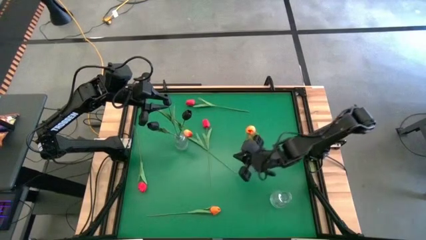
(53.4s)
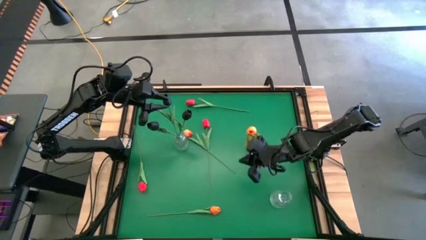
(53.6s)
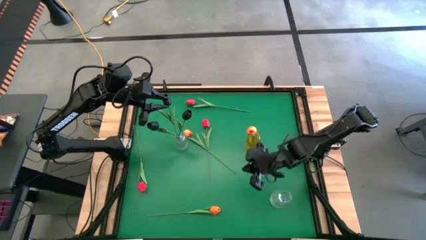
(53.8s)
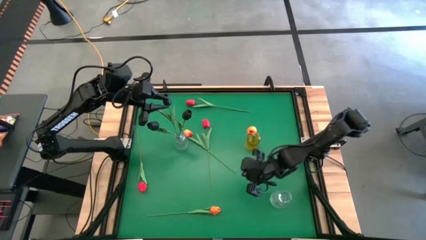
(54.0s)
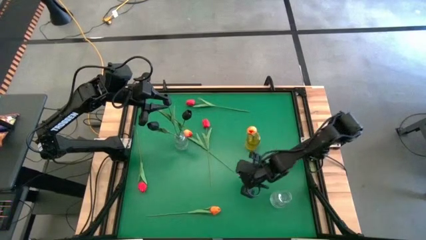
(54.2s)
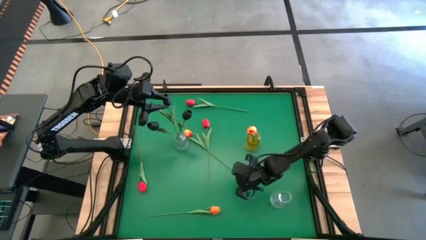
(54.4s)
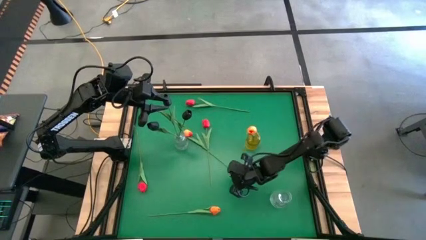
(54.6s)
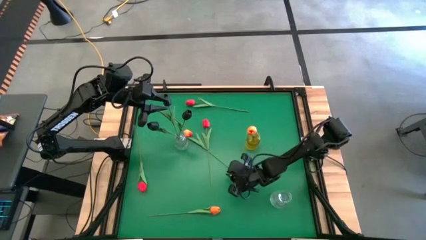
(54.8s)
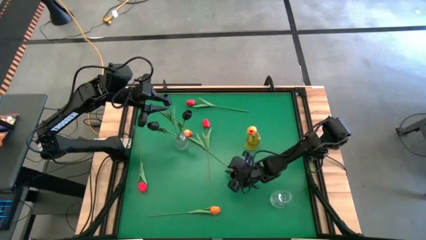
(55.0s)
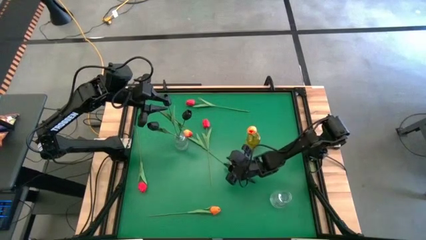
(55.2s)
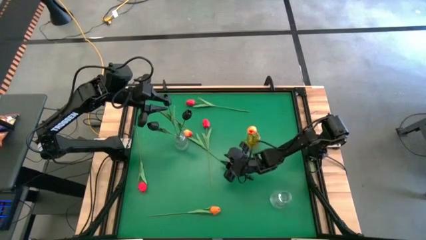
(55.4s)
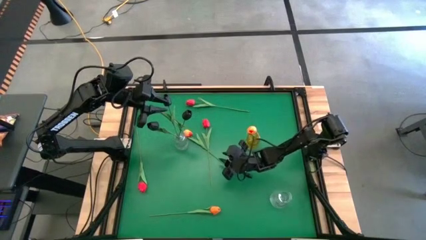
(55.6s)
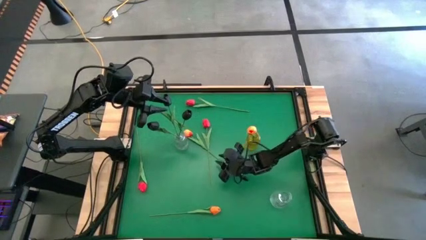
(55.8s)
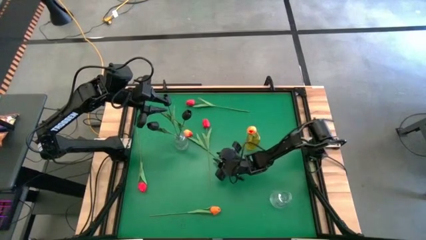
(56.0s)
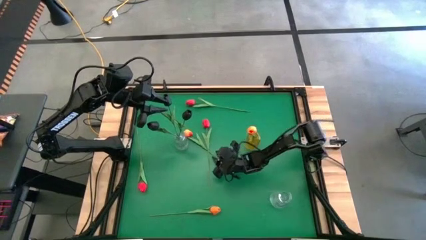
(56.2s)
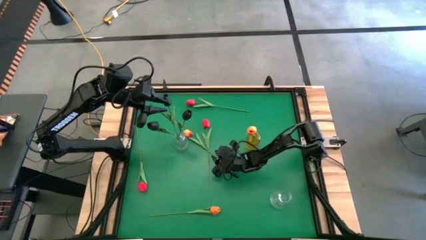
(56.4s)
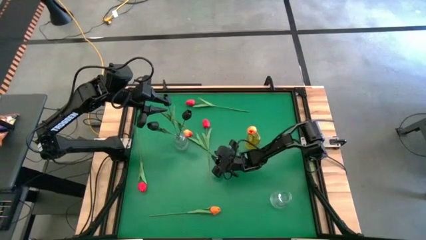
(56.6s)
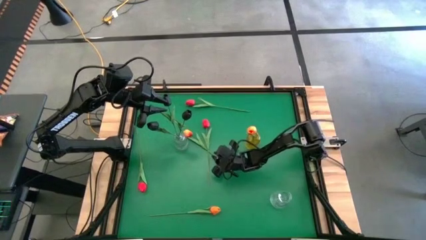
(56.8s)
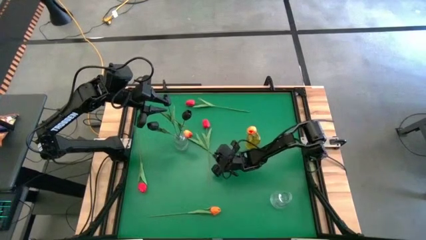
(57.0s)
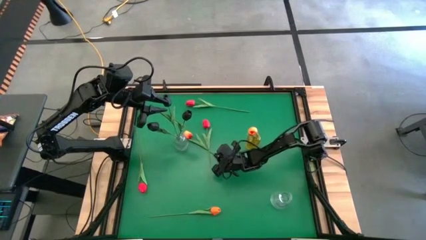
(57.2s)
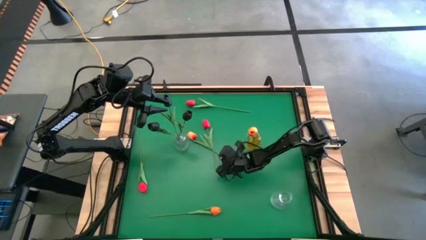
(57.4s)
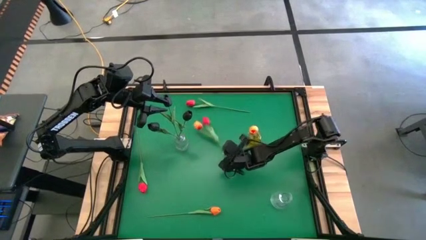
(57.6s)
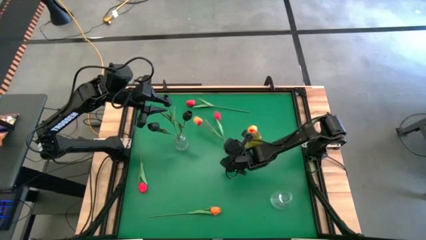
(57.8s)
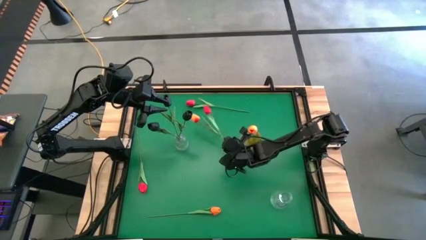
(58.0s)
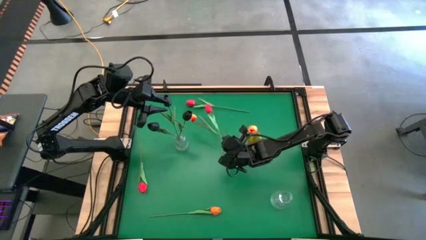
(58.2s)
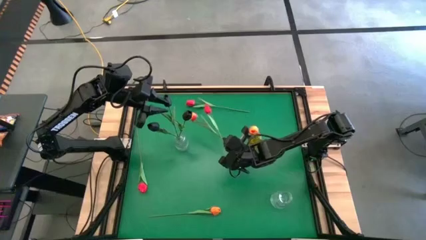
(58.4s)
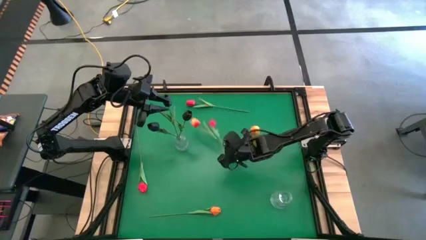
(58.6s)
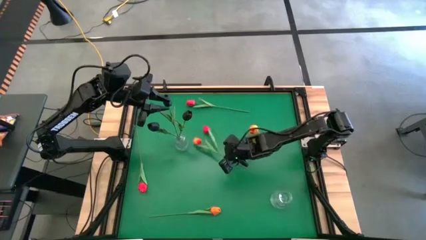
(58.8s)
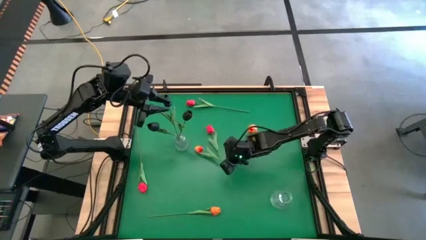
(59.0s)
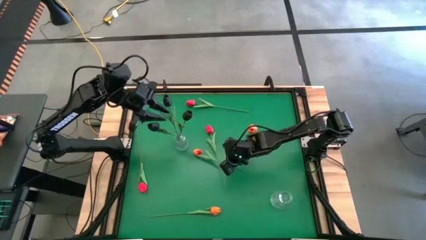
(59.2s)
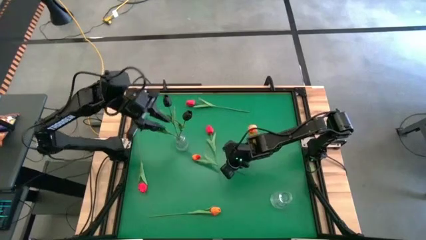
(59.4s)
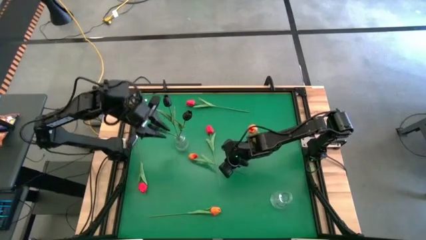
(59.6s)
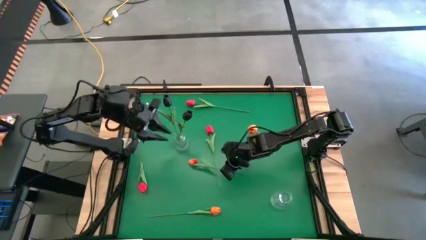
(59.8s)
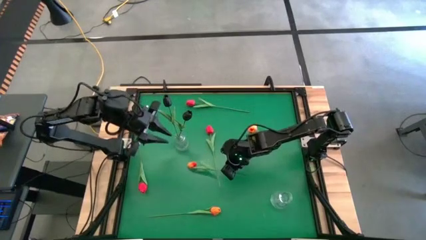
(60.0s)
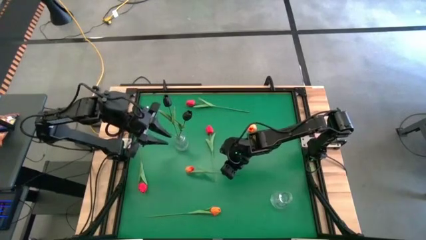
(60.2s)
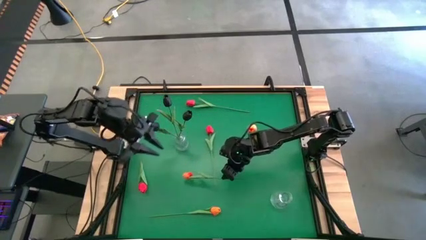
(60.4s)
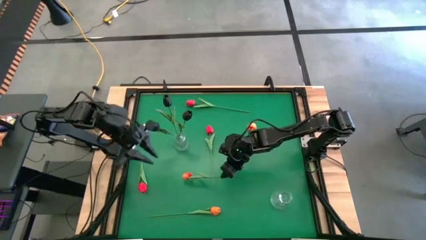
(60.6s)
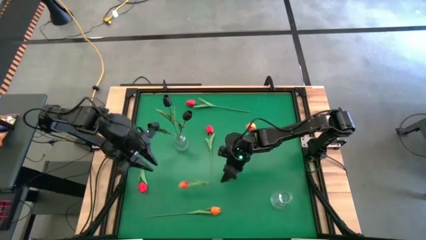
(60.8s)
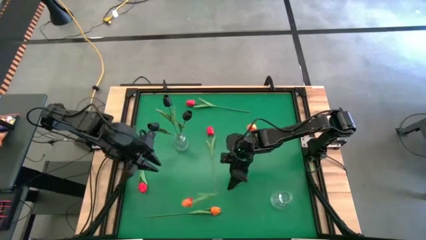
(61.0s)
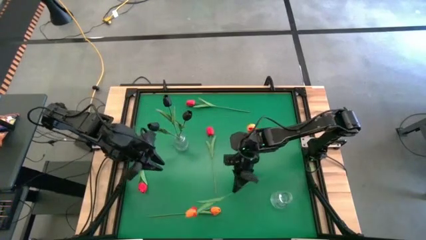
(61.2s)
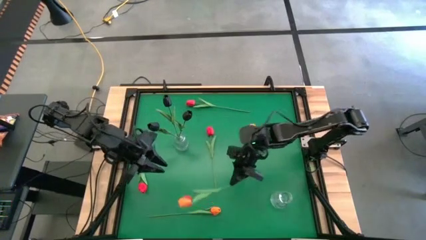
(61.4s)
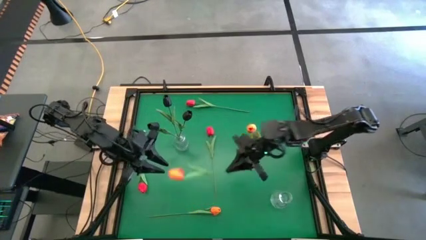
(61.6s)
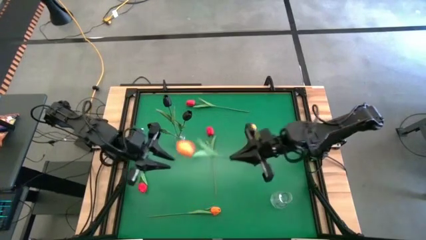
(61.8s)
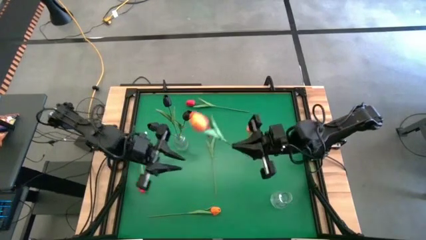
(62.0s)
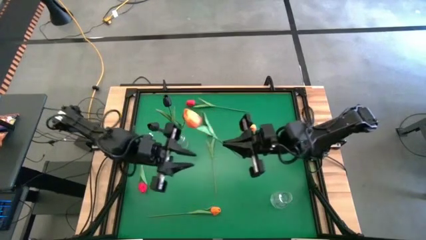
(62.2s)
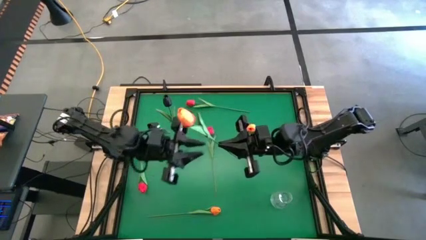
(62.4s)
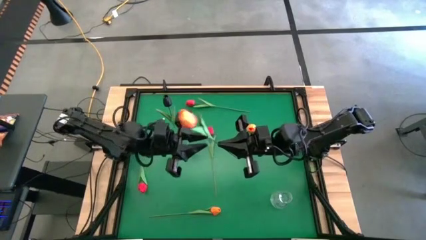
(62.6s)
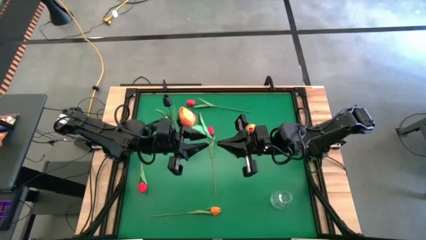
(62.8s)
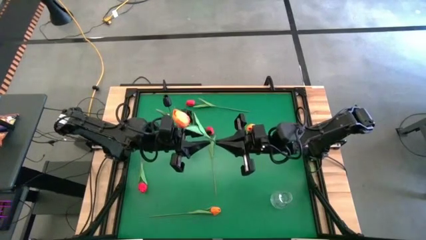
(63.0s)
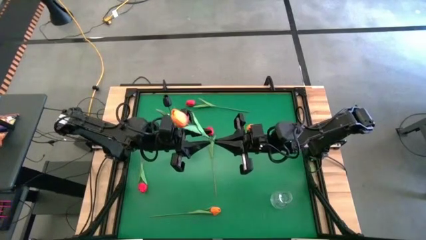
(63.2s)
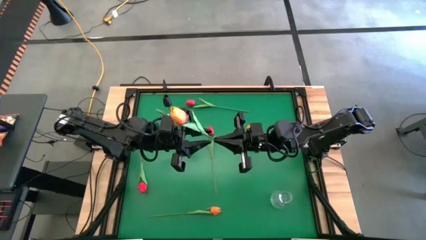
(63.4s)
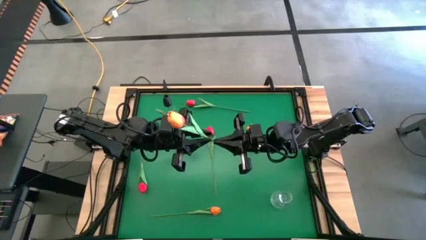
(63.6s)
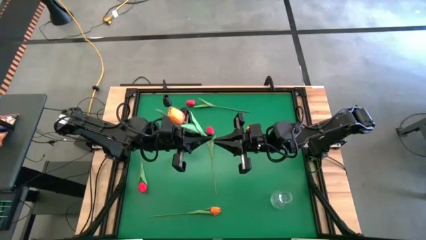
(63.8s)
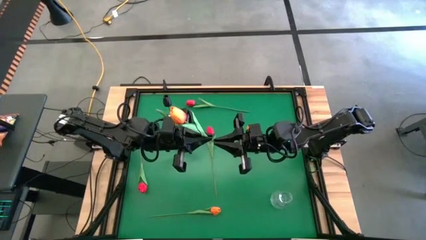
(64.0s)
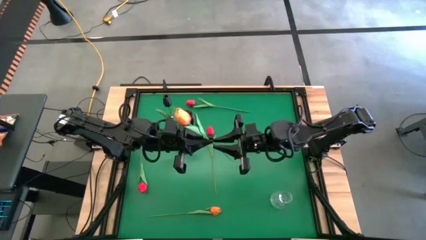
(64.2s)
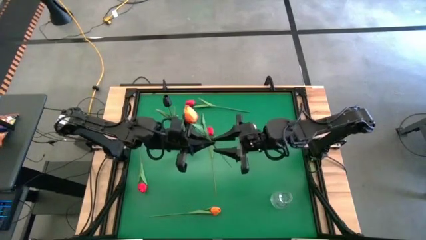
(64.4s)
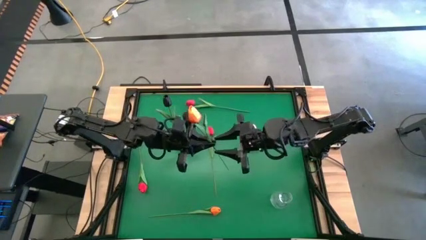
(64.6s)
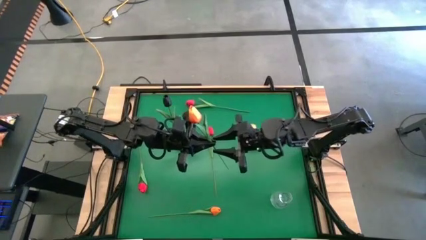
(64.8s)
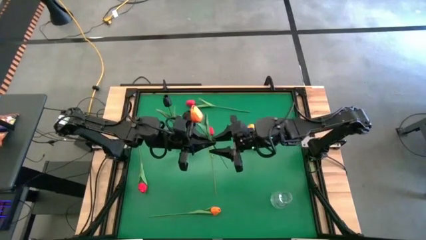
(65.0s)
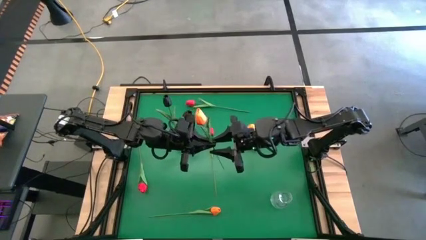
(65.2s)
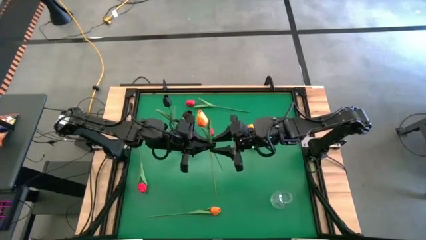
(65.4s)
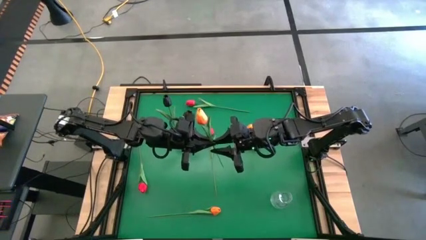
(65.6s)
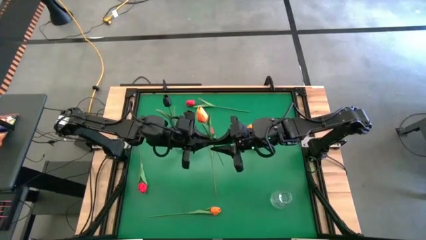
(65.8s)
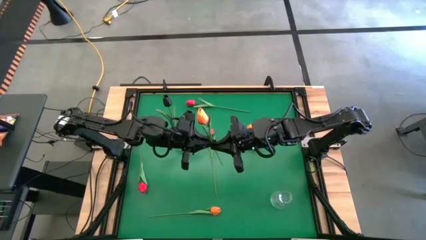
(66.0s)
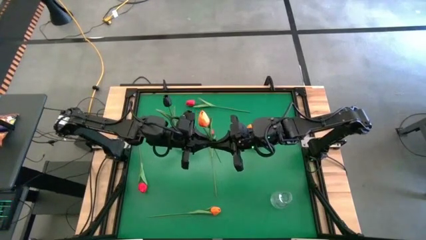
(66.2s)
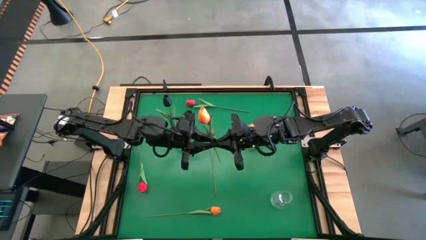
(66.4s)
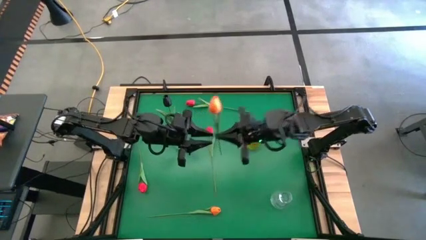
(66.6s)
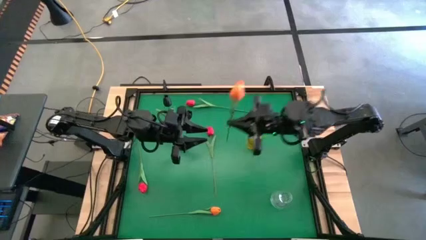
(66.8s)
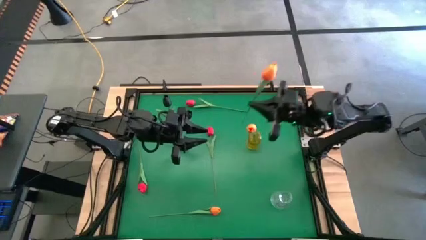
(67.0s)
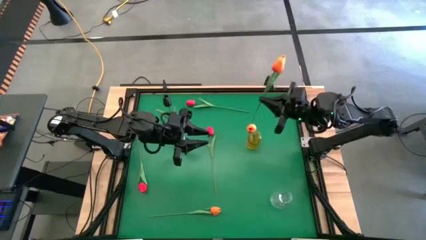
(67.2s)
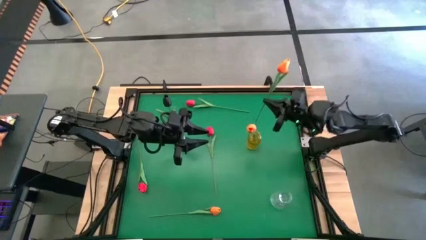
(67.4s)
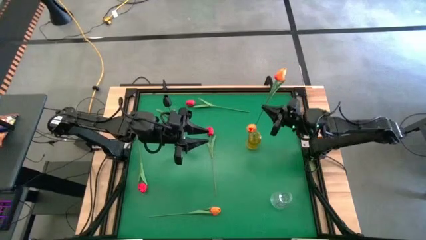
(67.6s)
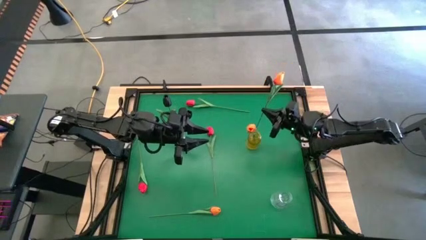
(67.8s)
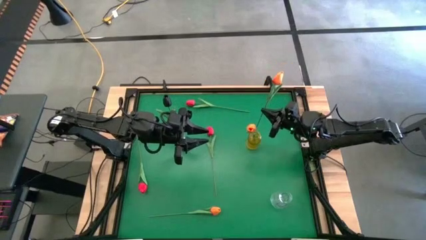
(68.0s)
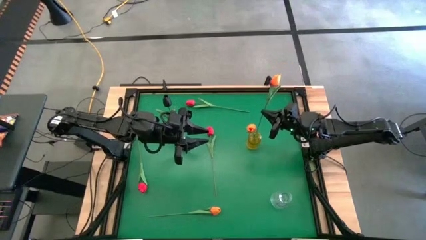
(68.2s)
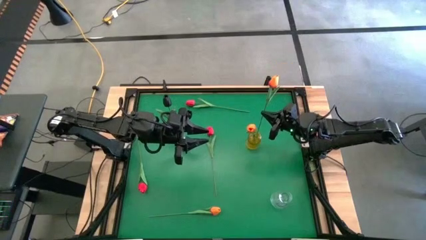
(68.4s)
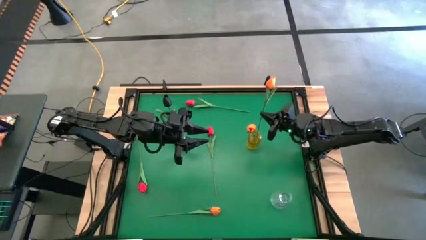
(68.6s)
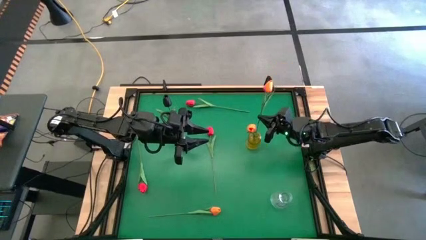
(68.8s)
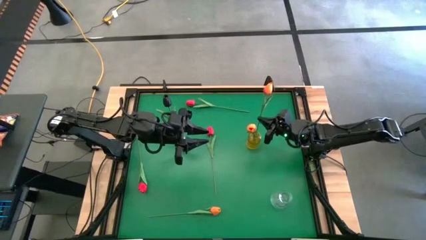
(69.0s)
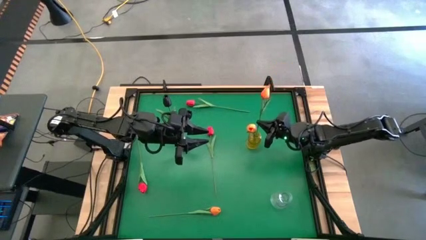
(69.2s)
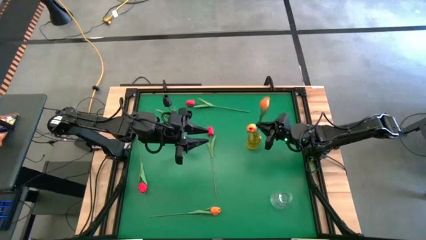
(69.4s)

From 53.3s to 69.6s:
Task: Sort flowers into vase by color
Put the top orange tulip into the yellow vase

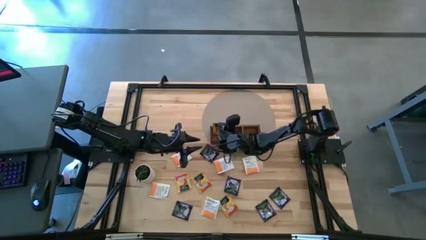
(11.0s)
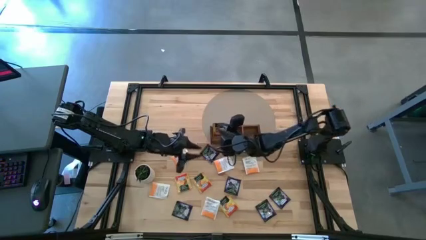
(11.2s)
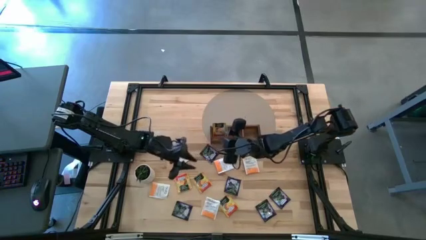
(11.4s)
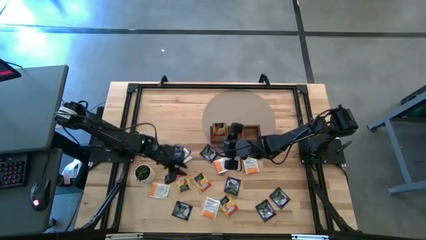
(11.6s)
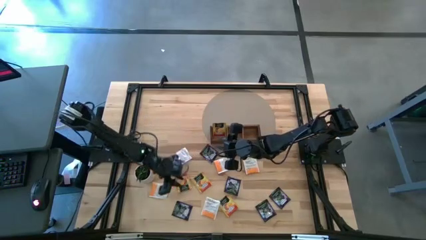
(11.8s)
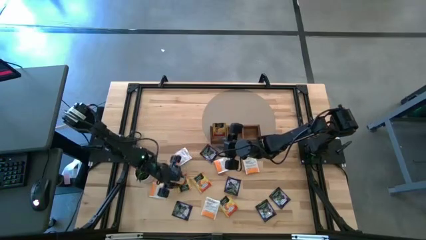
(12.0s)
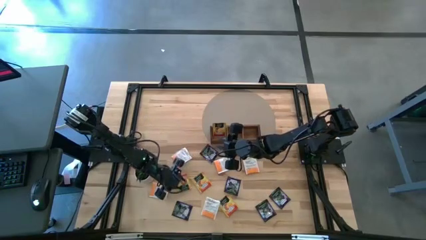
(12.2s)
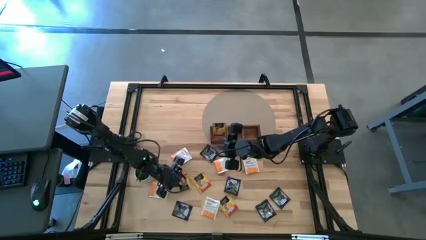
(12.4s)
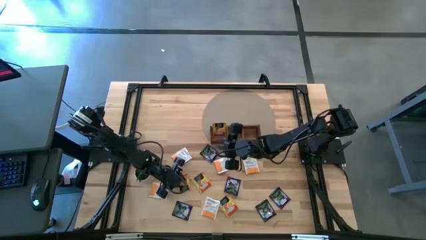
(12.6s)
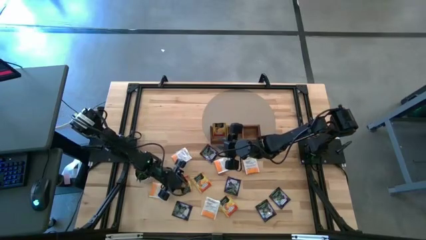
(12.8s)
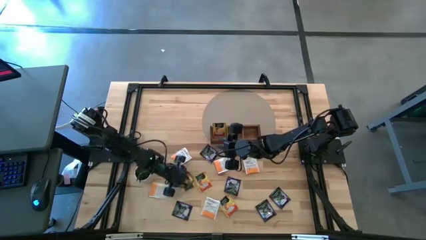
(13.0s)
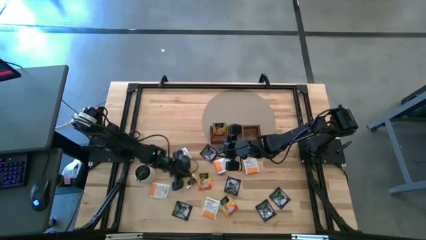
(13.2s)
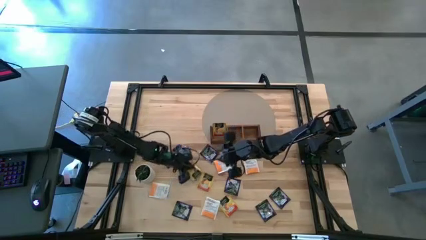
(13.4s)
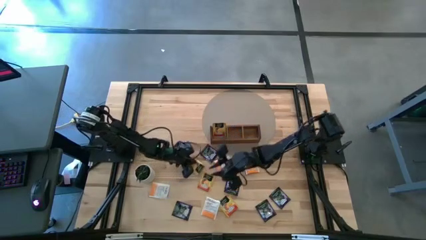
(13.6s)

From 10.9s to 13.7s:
Task: Pick & Place Tea
Put the yellow tea bag into the left section of the wooden organizer
